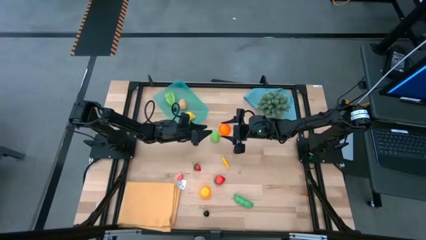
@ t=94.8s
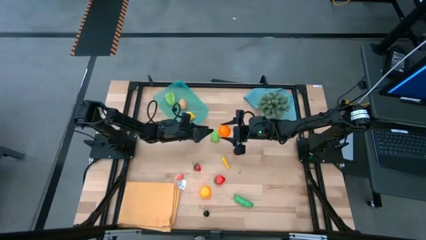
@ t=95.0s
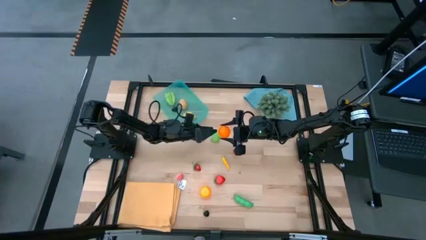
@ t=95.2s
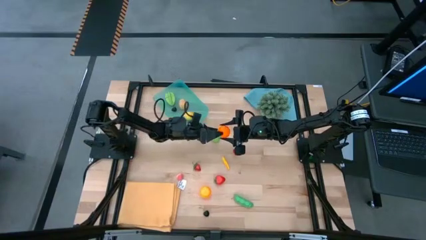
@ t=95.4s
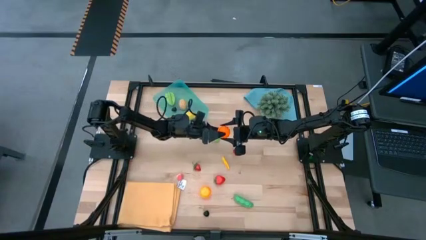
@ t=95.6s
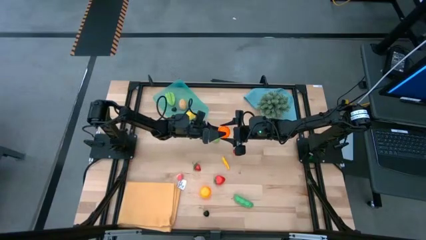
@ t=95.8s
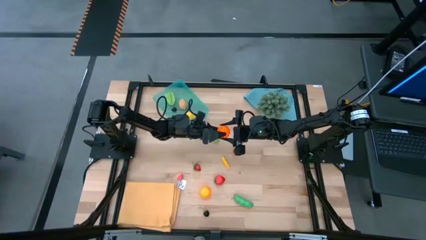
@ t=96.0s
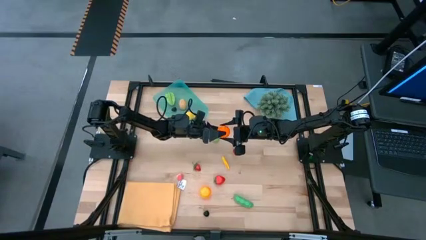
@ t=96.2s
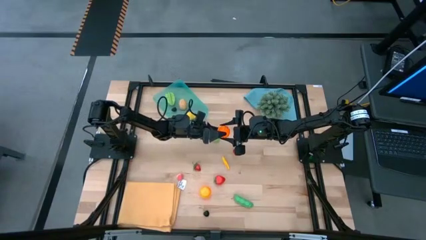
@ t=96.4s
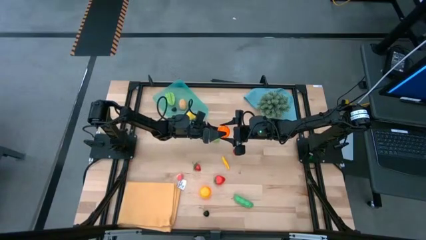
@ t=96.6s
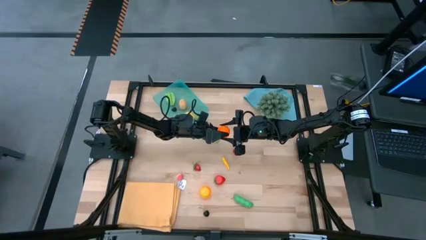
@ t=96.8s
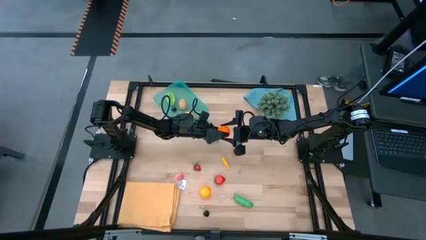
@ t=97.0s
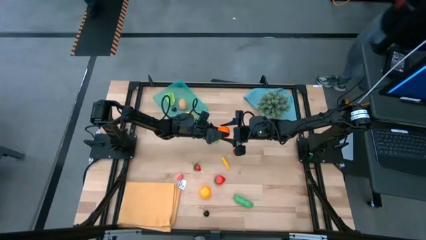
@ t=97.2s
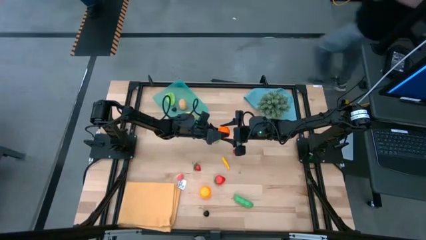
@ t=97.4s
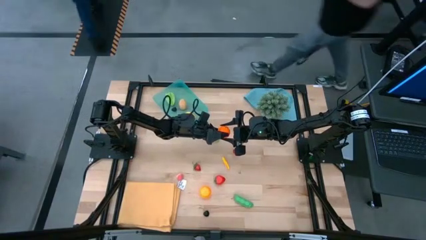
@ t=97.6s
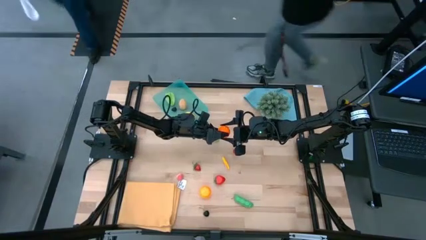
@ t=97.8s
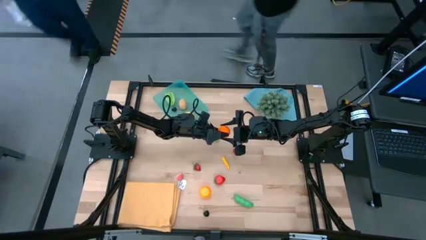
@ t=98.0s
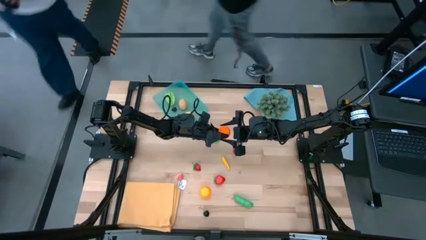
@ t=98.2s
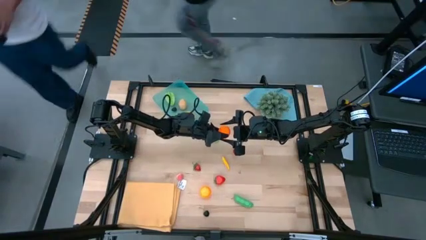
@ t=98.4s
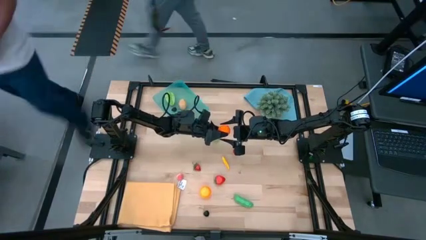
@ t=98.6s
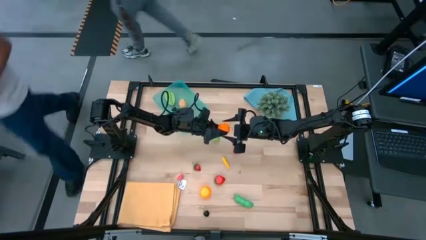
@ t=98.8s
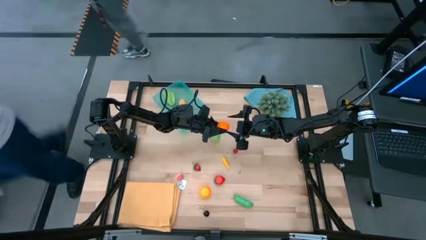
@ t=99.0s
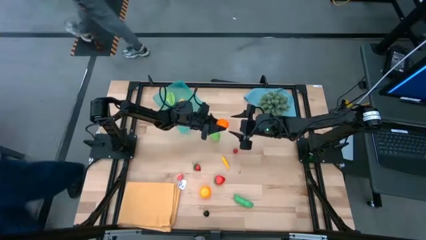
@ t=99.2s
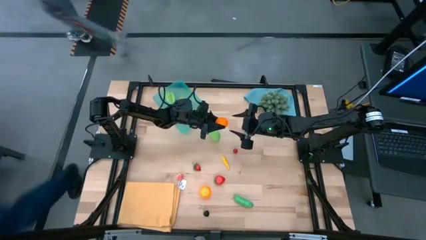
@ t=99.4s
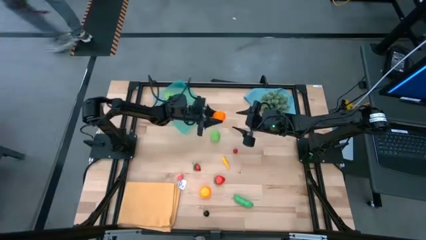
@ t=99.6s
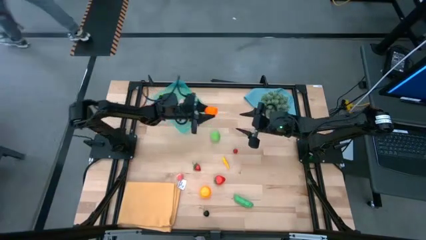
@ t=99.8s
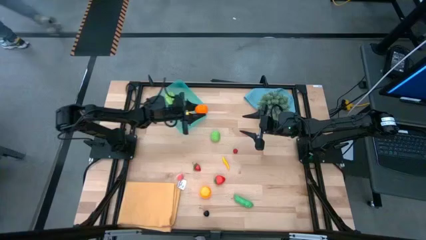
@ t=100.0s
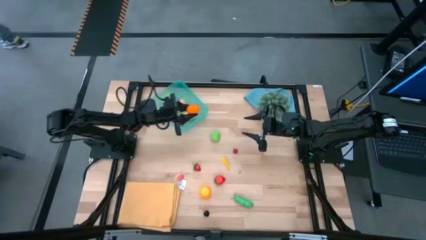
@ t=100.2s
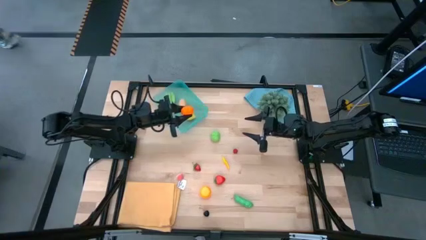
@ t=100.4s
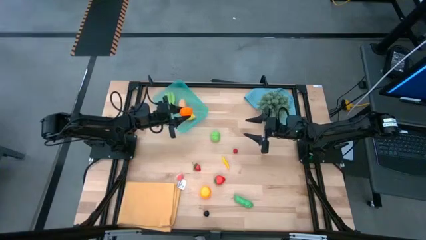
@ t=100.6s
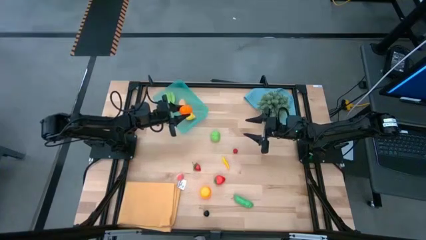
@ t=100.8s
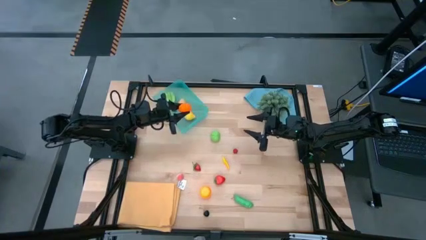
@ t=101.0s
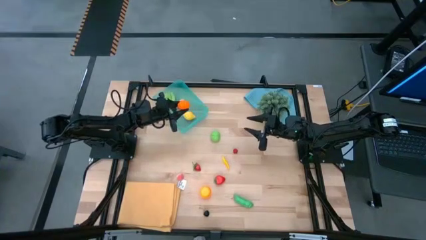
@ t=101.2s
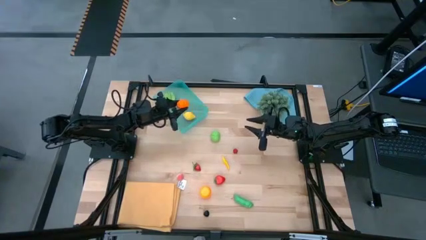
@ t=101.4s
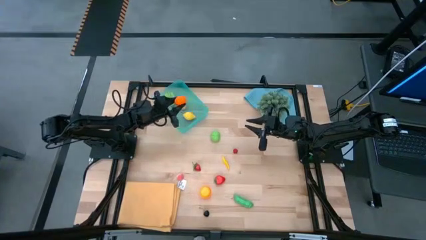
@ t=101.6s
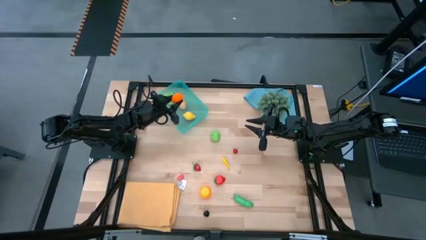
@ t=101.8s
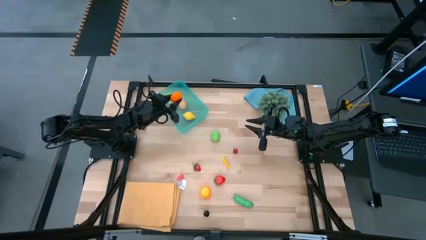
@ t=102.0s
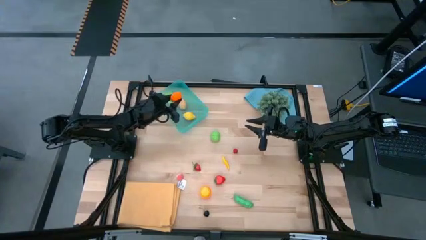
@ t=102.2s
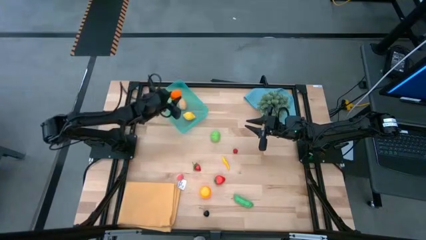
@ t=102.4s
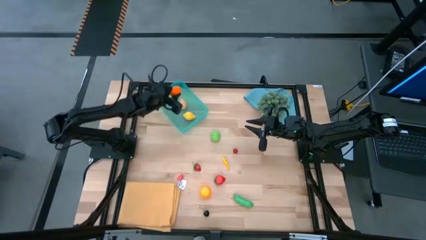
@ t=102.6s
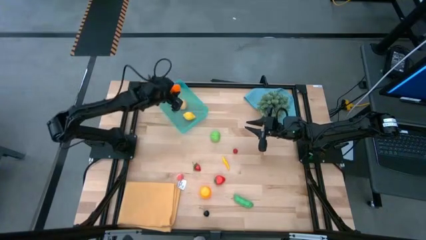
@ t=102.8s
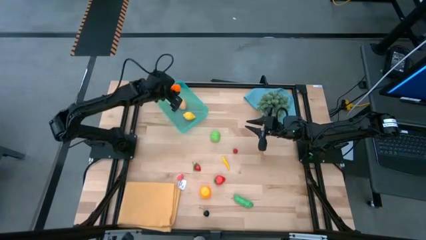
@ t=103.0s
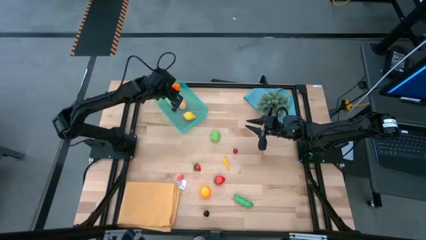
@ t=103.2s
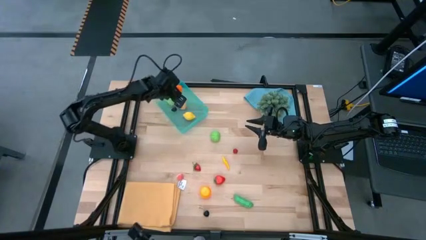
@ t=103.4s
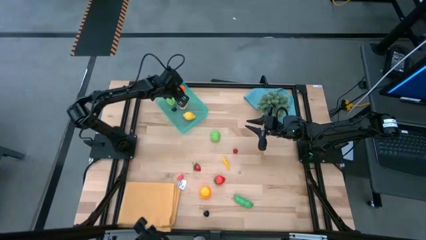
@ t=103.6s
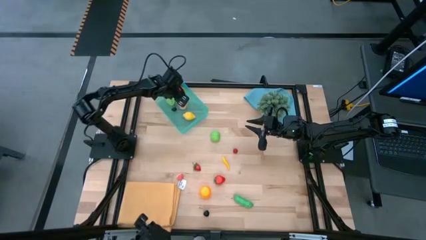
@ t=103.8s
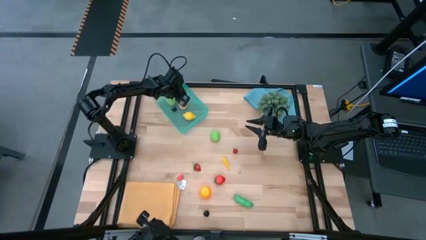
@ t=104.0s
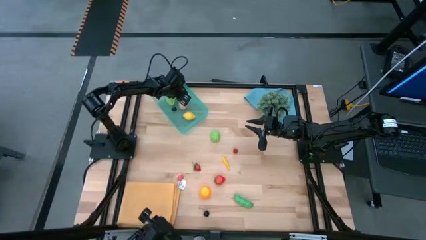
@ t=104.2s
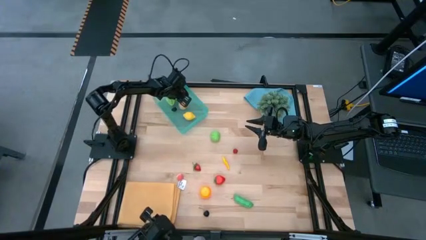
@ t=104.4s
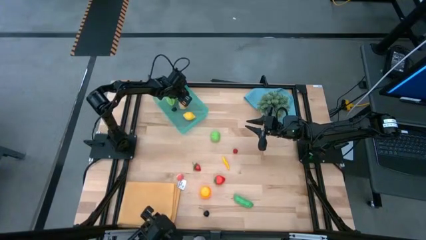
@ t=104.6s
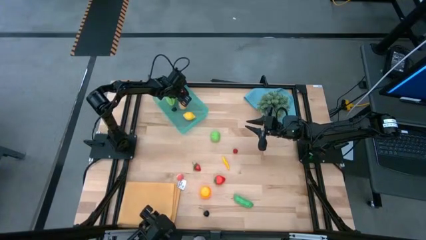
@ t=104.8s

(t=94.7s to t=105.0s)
Task: Pick and placing Produce into tupperware
Put the orange pumpkin into the blue bin

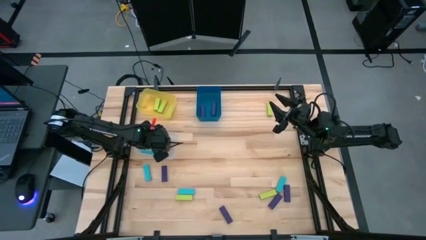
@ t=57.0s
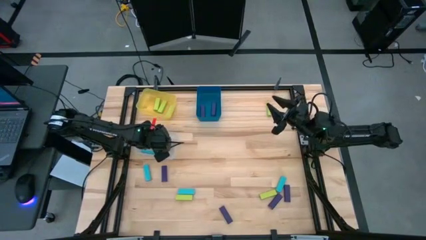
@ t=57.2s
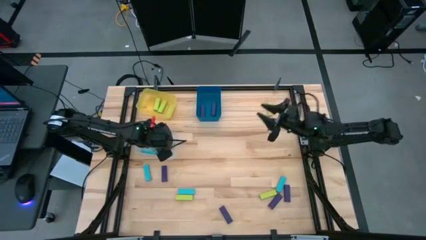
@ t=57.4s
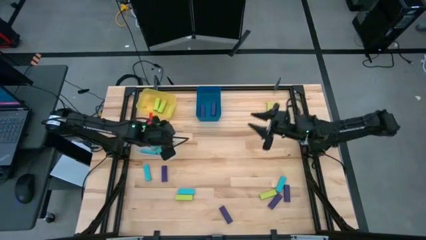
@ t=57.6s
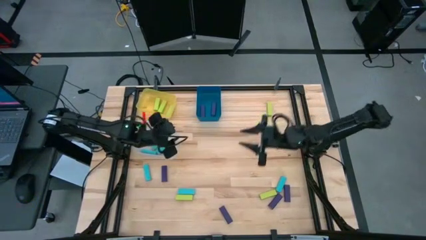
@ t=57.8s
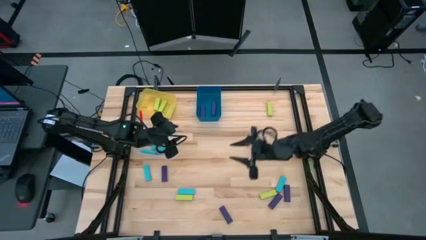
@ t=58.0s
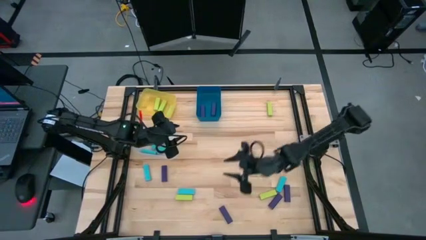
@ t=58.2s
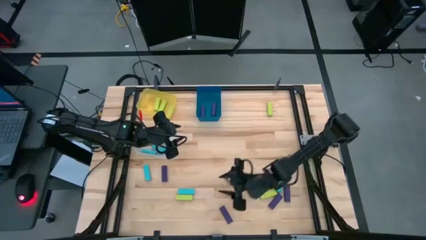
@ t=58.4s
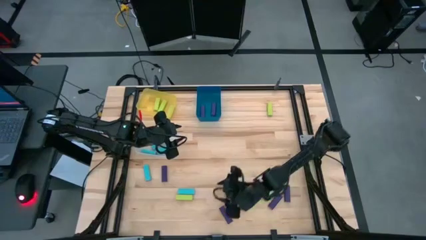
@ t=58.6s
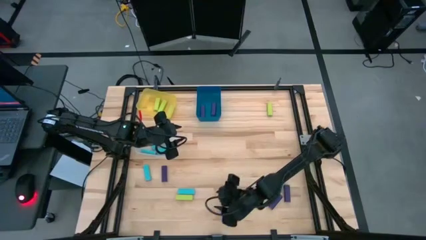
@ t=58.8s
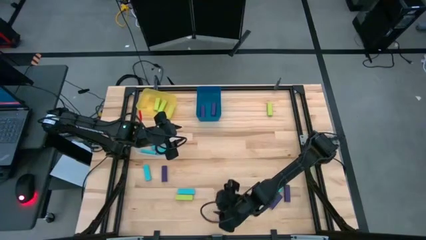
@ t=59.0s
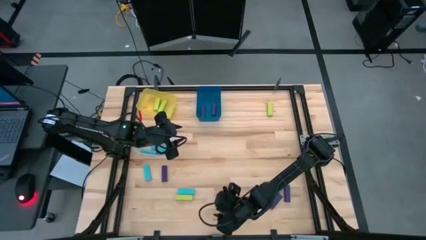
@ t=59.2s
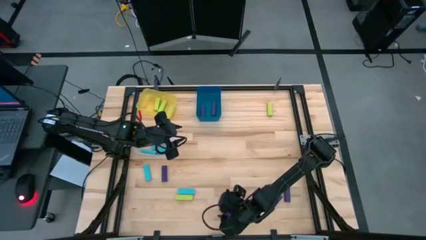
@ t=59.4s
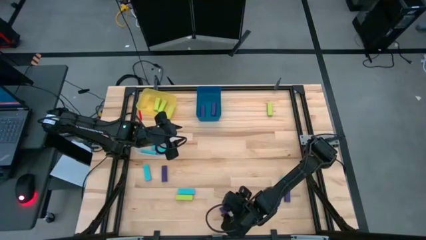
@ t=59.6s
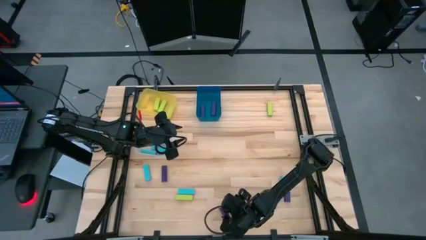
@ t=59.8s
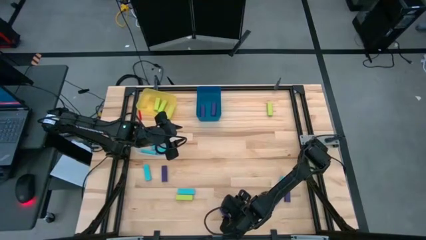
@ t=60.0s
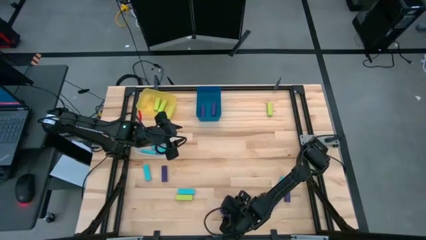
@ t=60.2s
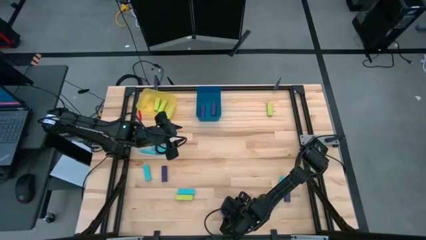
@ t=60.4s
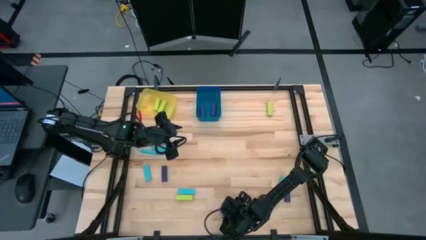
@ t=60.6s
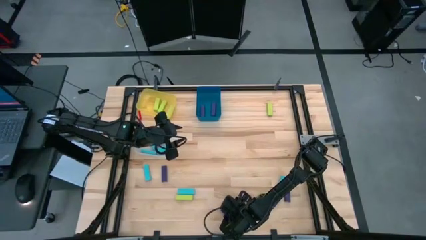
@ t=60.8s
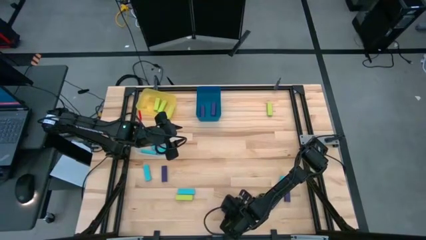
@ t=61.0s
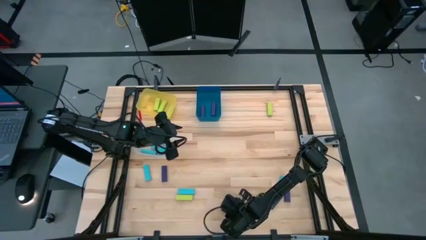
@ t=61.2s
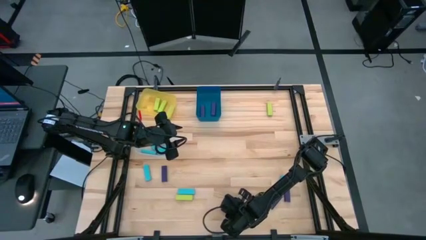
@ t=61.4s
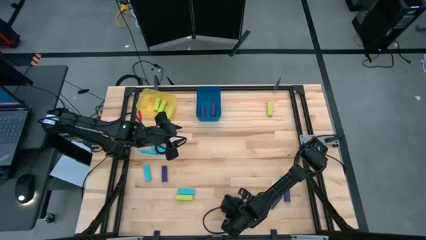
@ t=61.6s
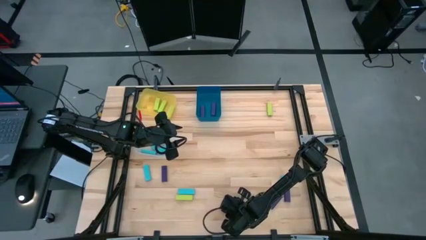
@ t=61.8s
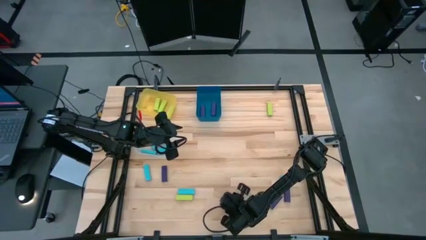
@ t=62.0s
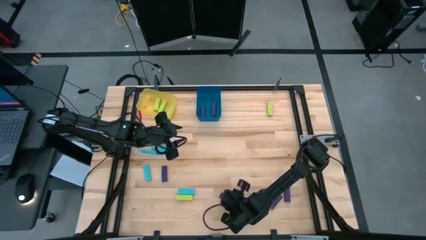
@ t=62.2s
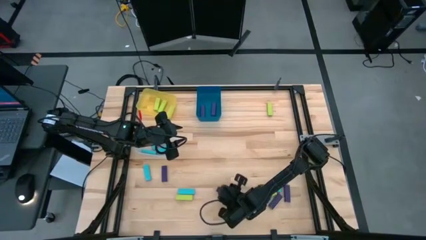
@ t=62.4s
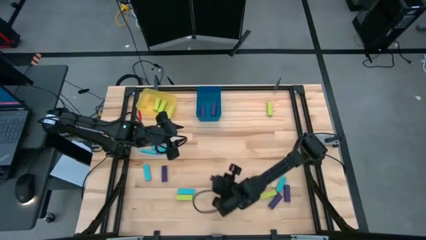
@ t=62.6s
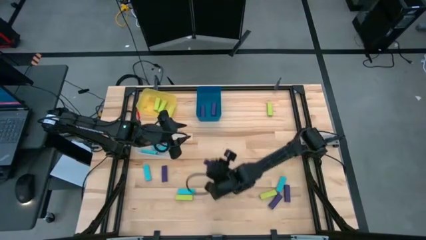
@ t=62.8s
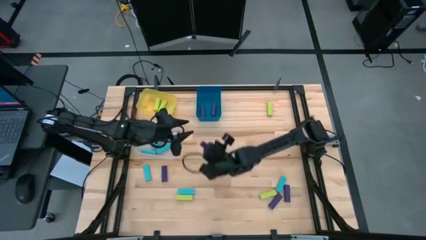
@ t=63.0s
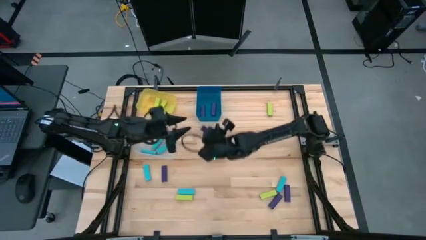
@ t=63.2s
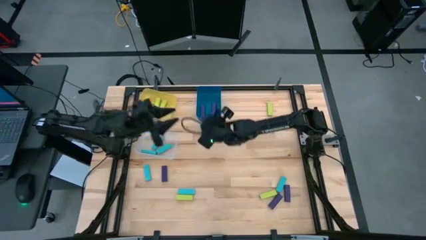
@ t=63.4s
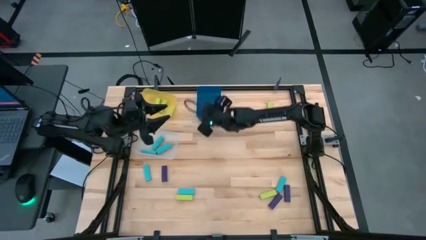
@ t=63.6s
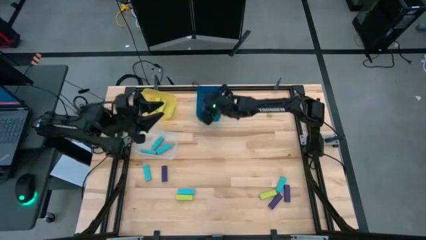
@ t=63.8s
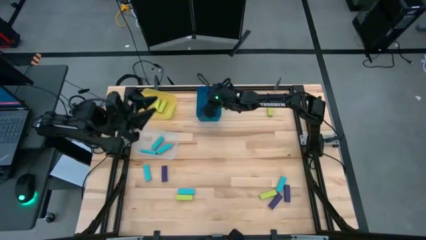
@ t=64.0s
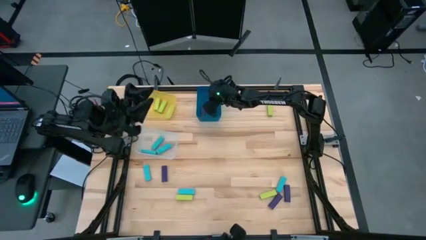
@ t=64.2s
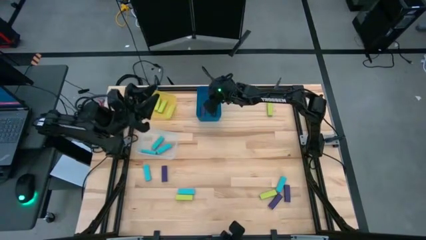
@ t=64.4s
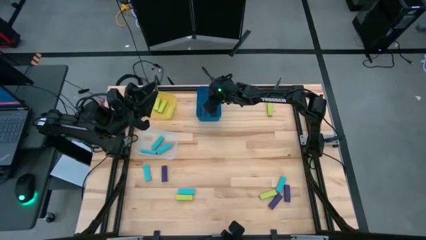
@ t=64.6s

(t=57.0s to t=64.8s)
Task: Sort blocks
Put the purple block into the blue bin
